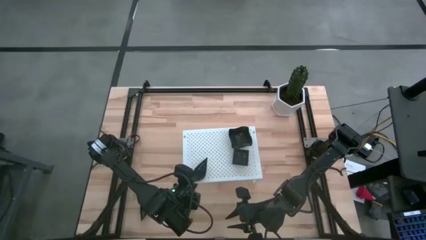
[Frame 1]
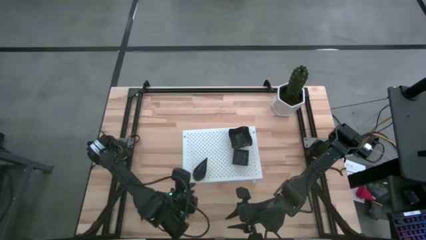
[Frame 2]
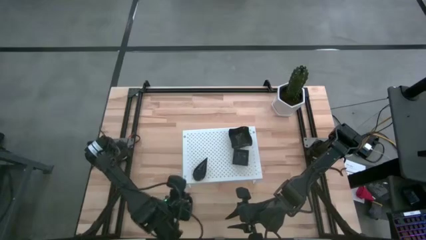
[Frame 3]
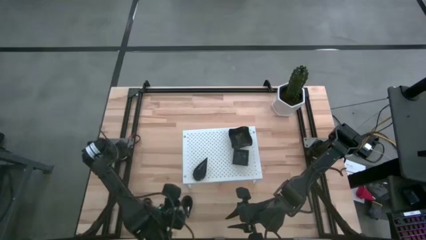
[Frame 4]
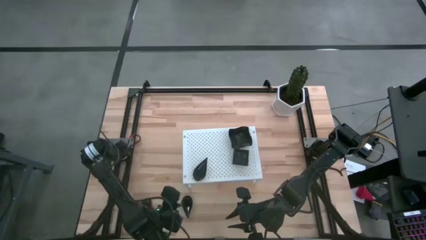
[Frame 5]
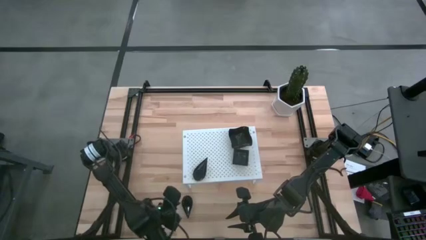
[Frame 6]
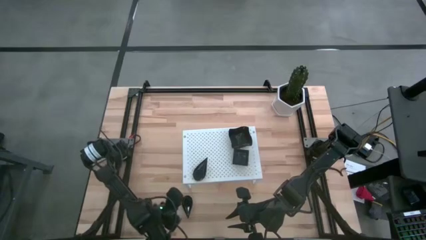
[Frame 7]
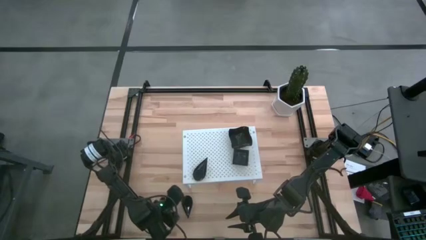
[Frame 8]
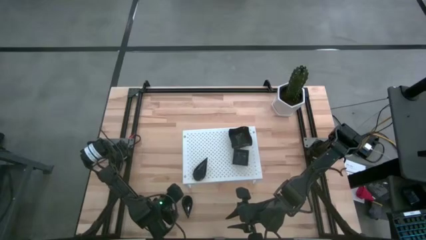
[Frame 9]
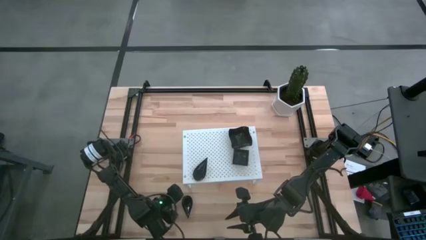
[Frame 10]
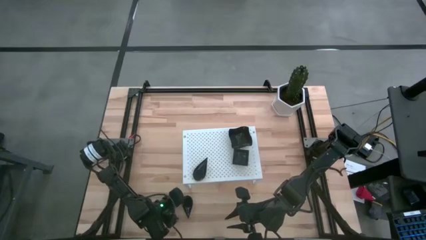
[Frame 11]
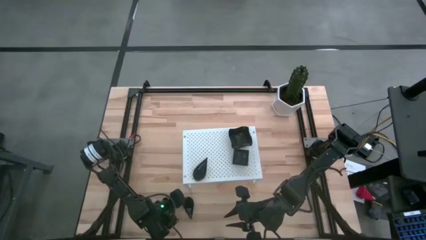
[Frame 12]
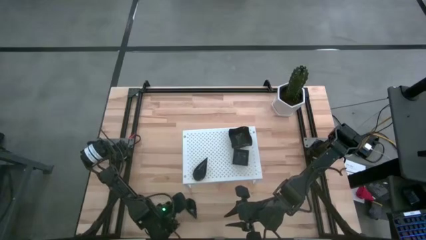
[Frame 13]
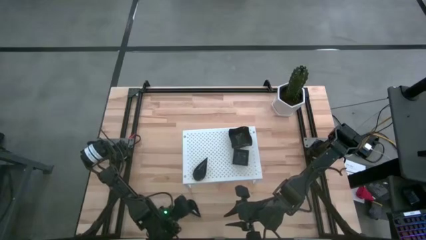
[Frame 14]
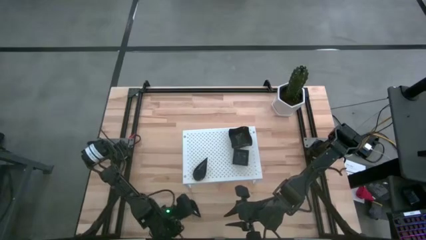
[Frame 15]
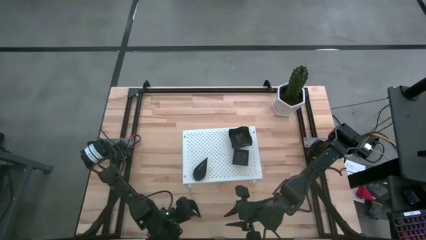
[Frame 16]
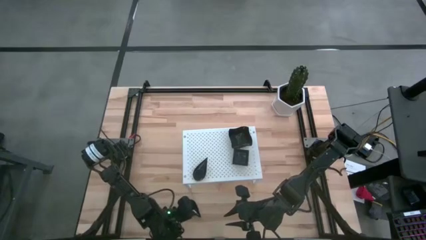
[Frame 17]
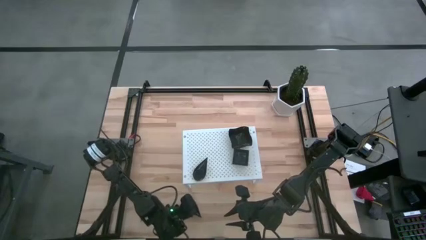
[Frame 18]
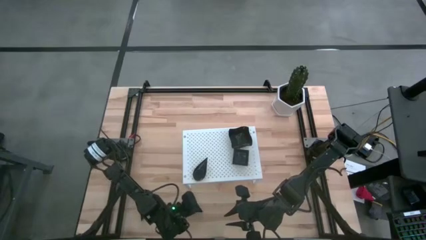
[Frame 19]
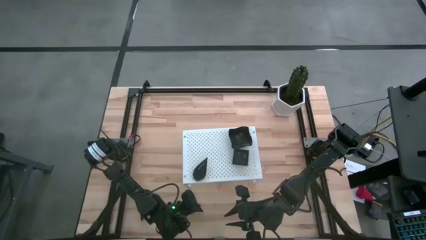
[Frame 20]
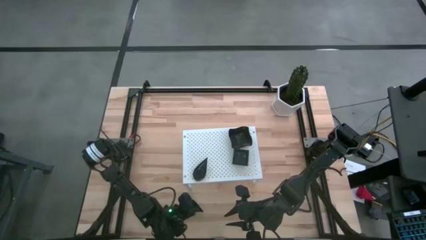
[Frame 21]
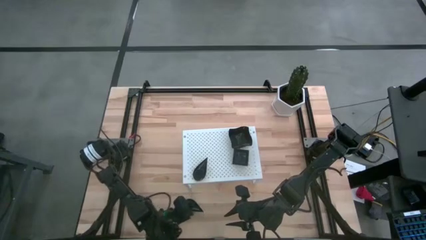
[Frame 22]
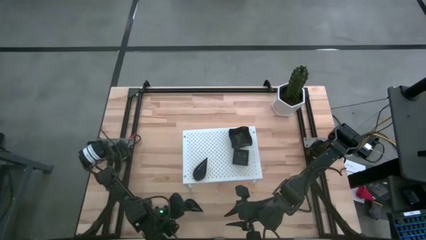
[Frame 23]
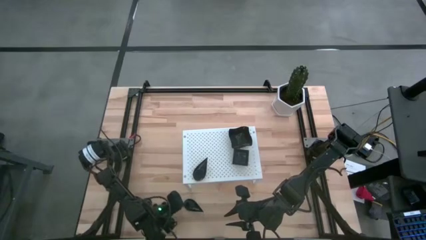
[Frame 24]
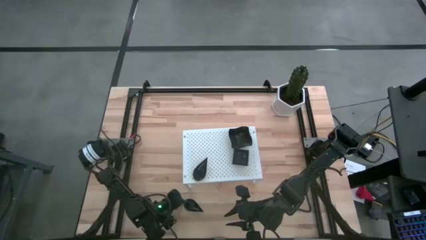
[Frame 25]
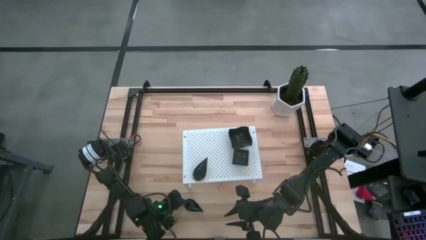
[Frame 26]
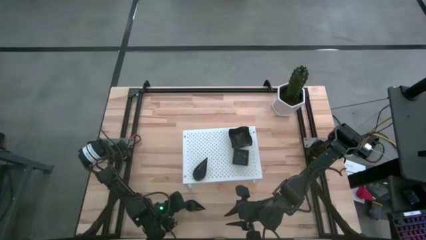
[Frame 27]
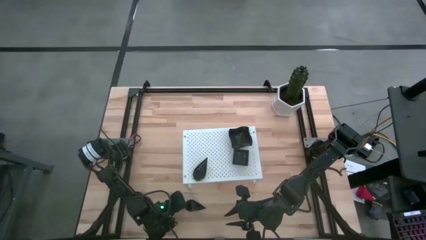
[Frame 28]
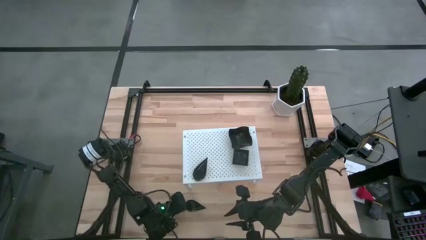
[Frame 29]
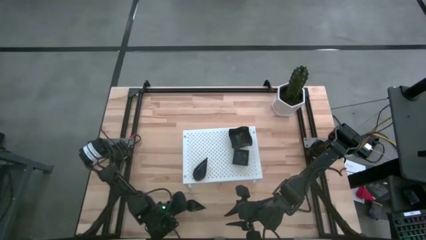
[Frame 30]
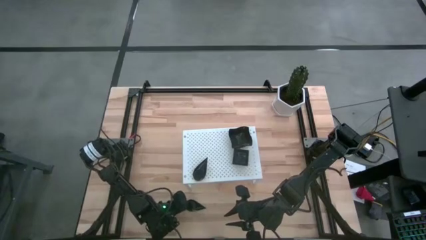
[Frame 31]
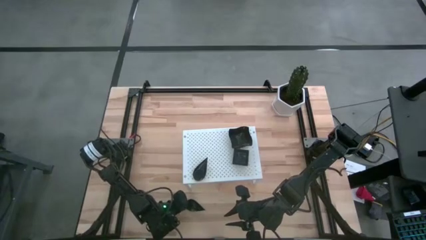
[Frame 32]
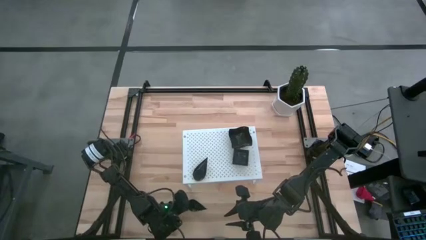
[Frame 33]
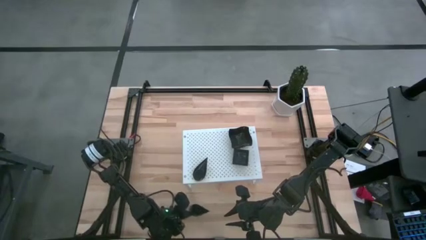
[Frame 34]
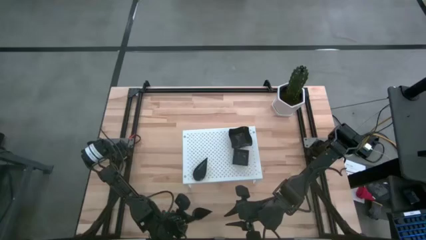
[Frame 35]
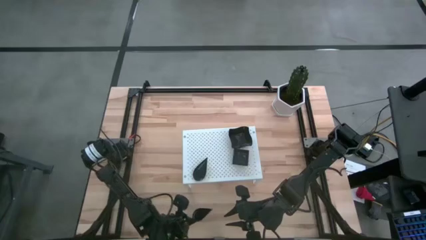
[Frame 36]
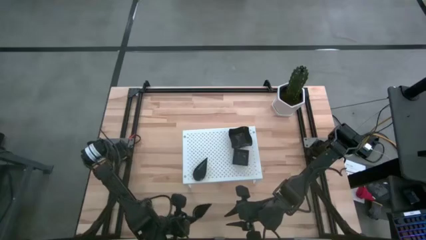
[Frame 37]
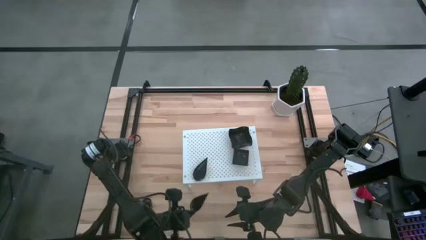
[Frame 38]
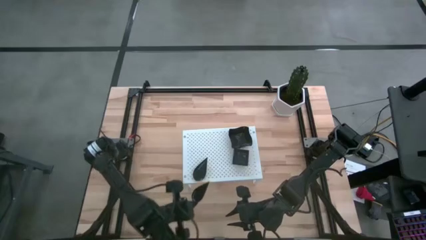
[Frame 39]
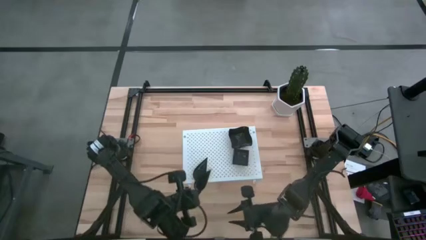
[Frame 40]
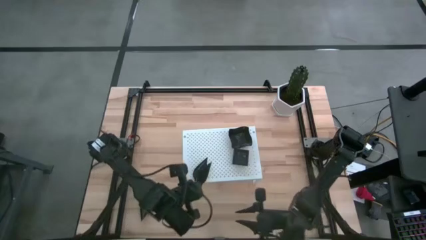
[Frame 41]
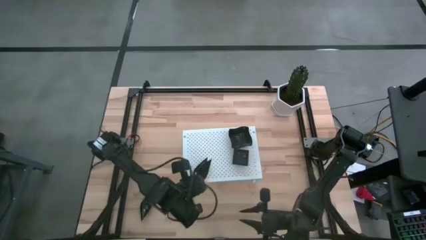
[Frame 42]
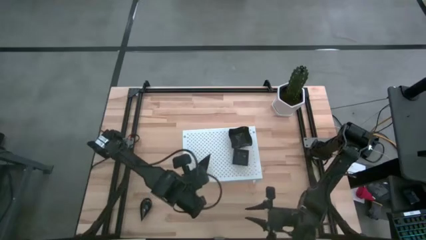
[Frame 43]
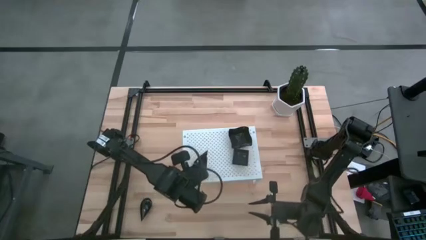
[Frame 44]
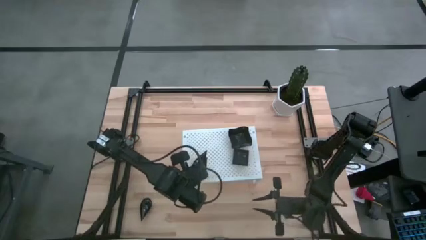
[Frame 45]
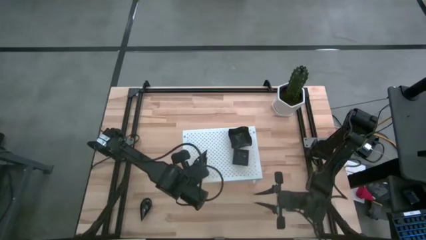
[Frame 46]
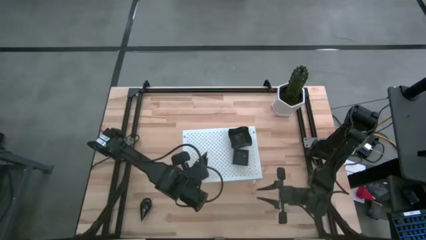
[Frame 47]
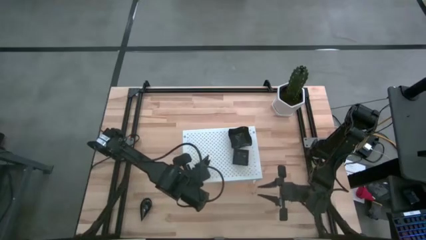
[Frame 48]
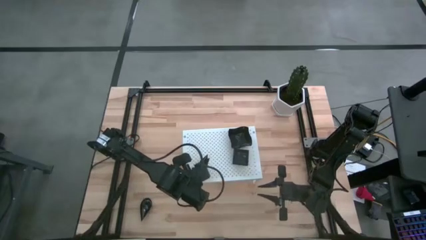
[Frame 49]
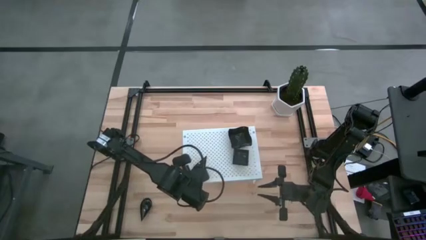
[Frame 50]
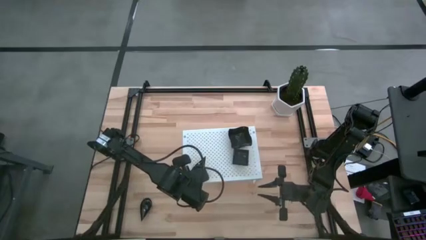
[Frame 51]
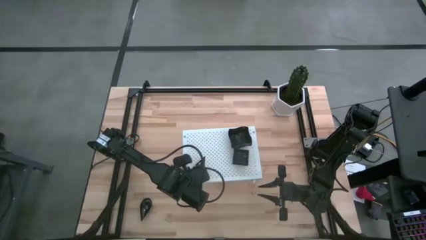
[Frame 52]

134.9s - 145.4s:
Task: Pick & Place Mini shaped plates
Stack the drop-shaped plate on the other drop-shaped plate on the shelf

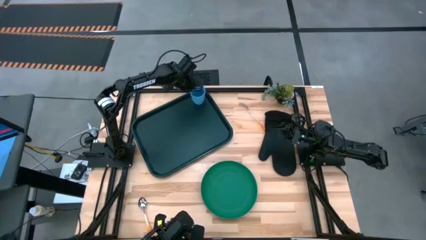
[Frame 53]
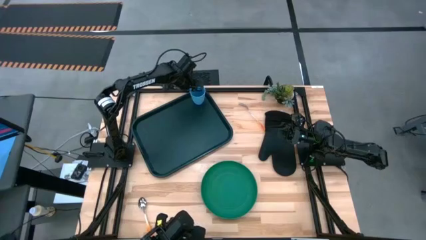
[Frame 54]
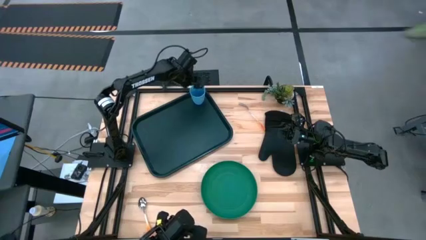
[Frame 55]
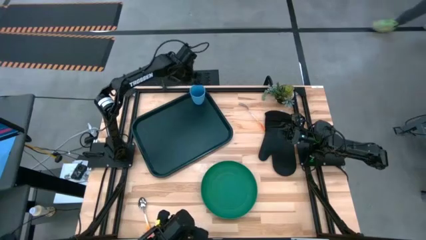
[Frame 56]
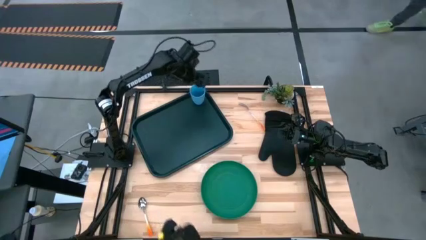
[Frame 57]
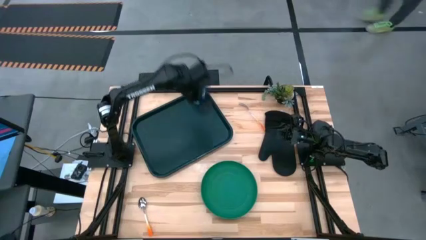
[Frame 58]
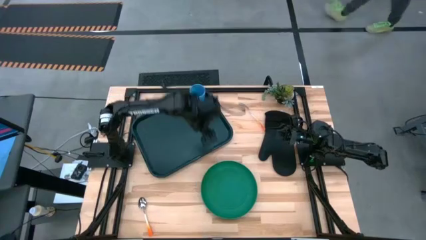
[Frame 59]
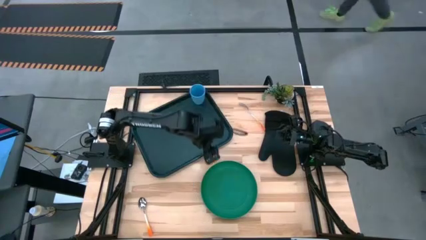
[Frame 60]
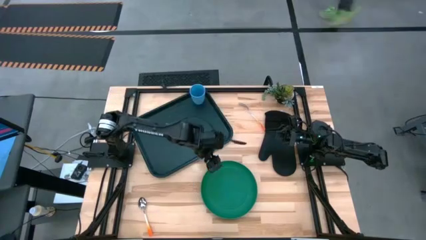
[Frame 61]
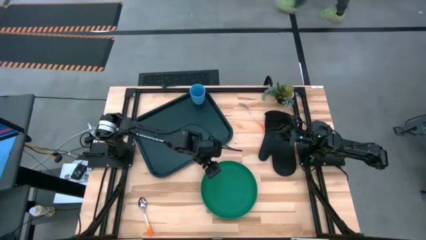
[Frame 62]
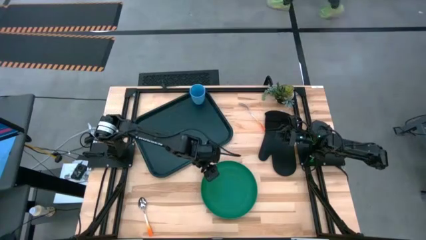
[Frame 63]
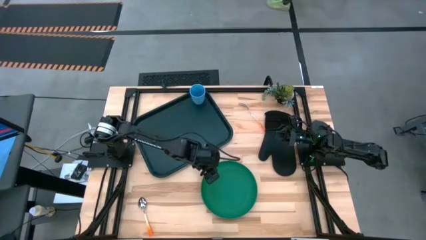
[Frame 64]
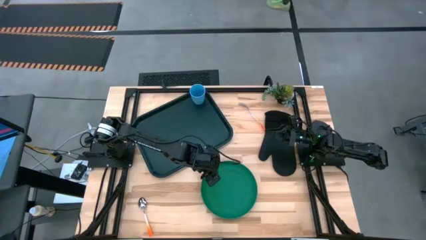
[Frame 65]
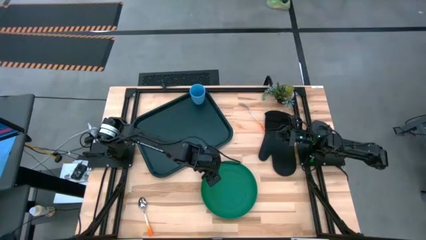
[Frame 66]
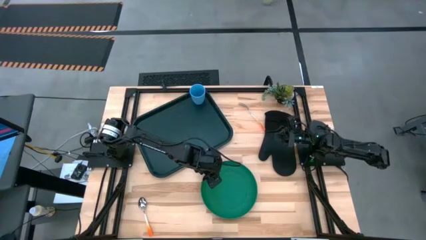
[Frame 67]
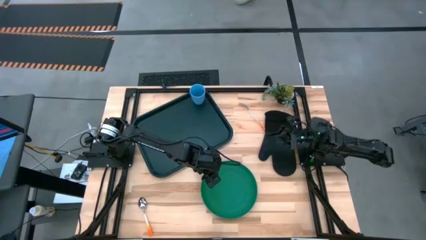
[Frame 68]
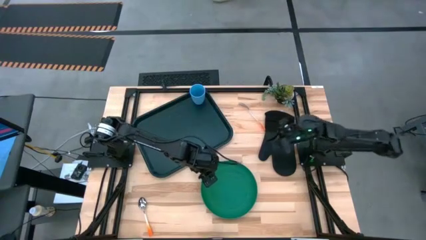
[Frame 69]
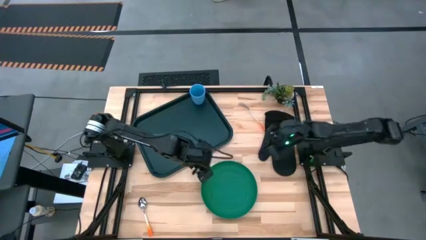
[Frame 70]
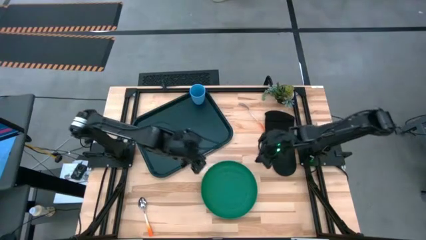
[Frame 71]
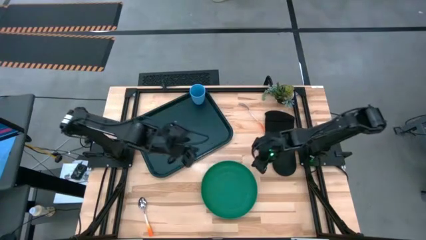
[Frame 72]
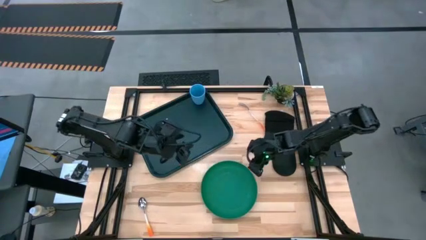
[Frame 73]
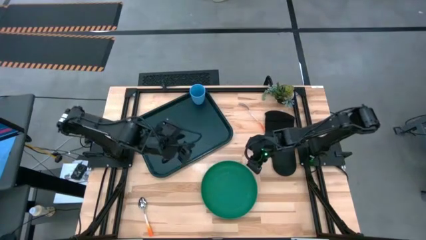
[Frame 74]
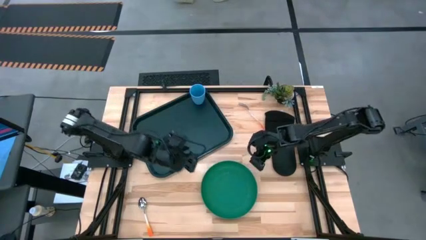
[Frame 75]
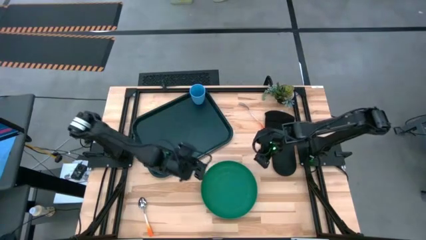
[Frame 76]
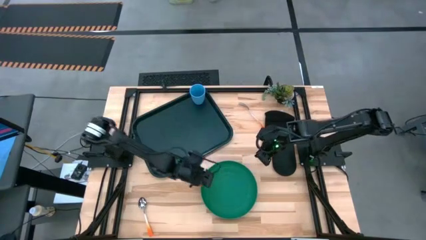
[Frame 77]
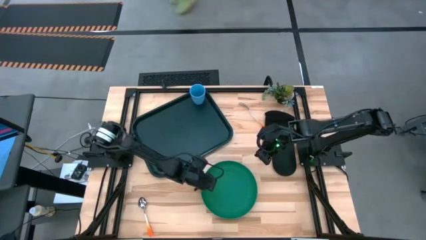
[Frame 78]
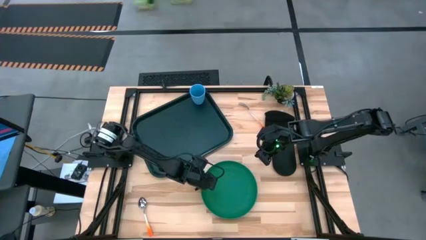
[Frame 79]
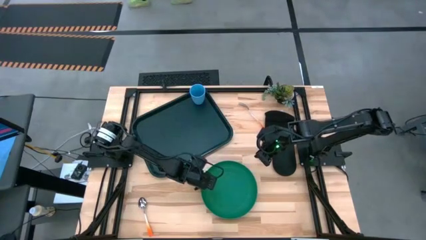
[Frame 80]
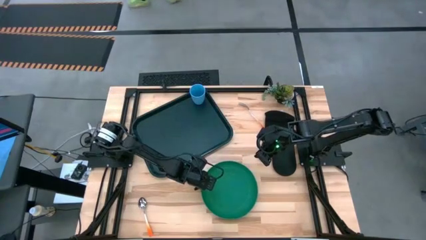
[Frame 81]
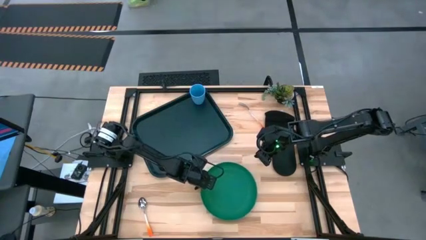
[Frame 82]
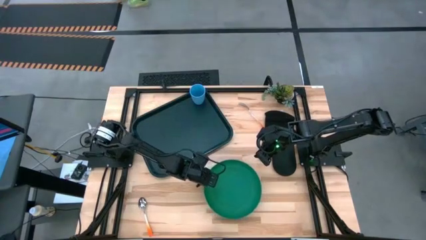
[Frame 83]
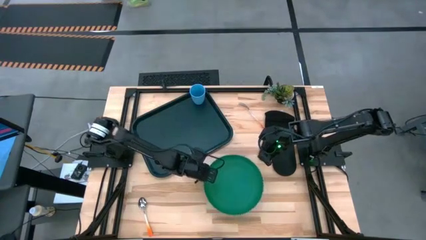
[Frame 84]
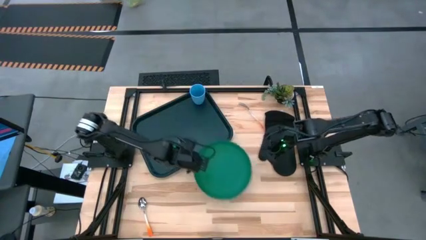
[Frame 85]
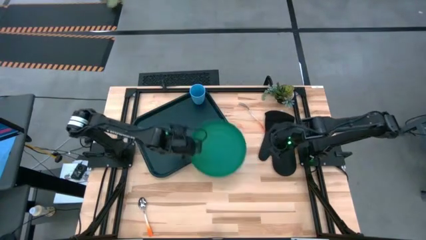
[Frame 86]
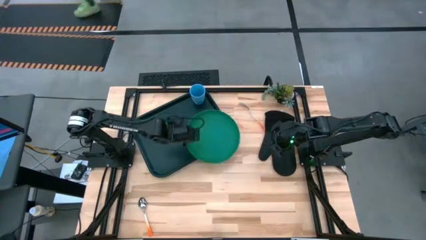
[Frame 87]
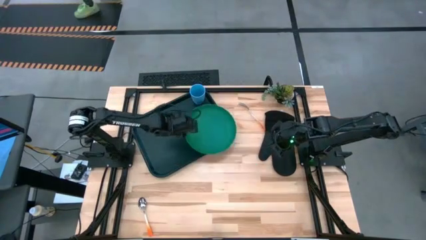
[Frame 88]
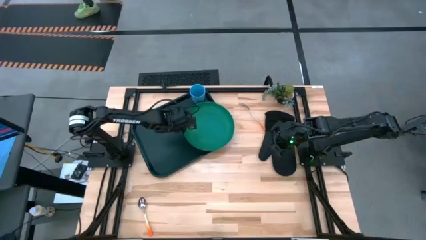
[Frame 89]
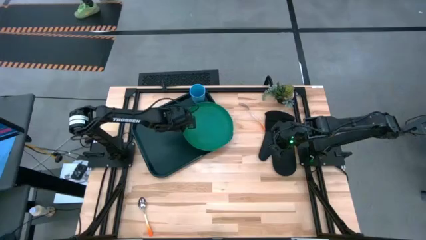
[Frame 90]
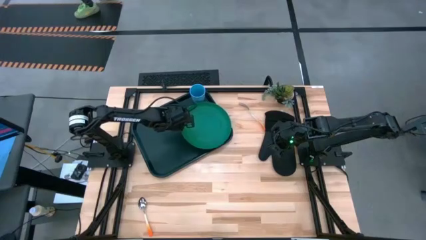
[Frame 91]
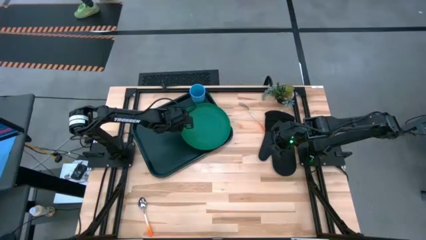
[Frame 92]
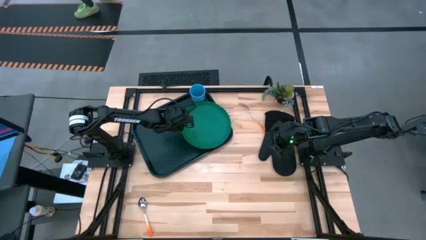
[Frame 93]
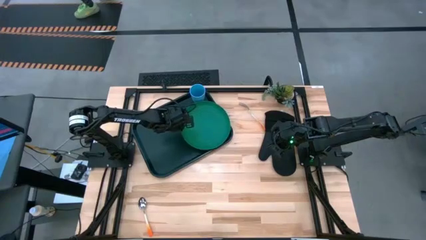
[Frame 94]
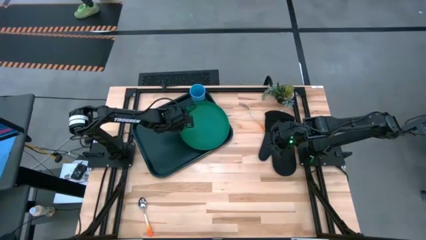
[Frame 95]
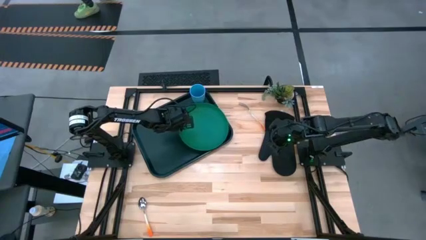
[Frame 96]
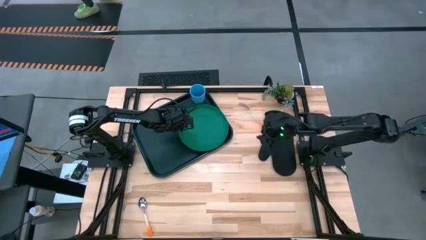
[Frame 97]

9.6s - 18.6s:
Task: Pick and place plate/cup/fork/spoon on tray
Put the green plate on the black serving tray below the blue cup
